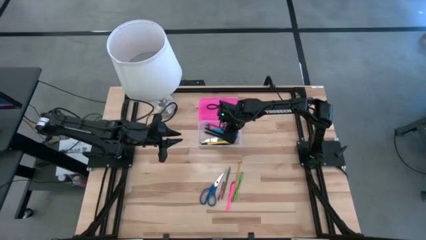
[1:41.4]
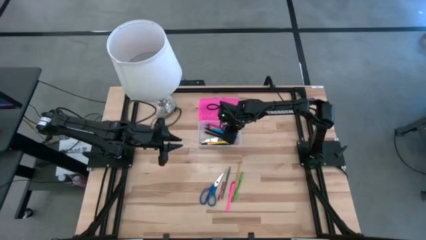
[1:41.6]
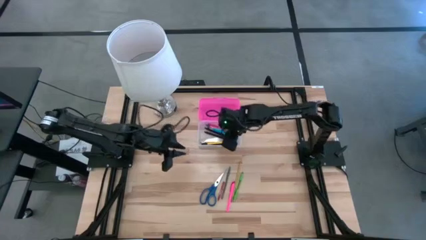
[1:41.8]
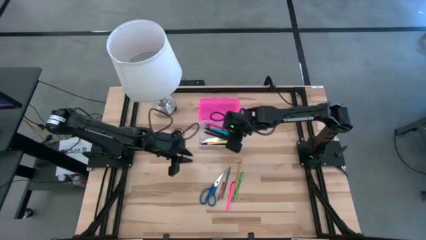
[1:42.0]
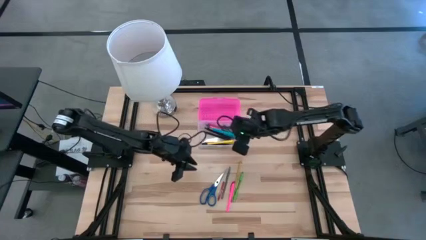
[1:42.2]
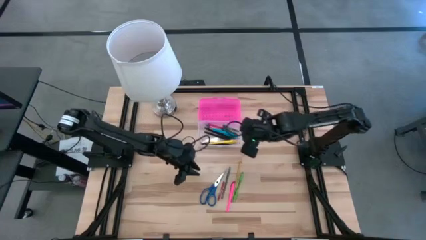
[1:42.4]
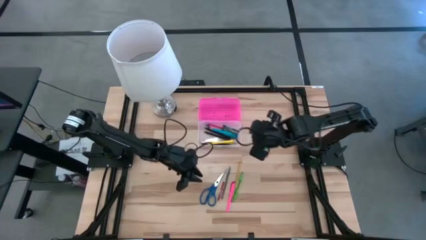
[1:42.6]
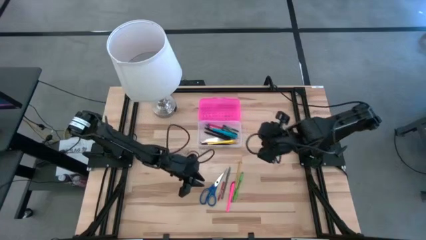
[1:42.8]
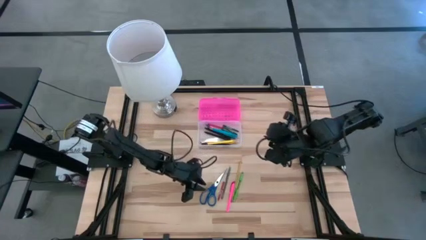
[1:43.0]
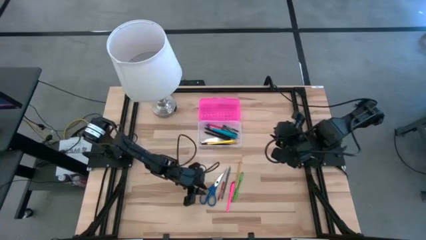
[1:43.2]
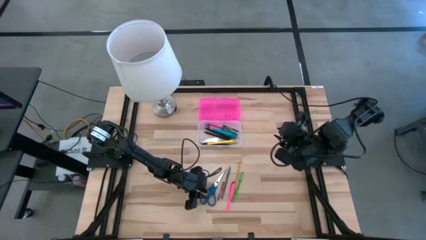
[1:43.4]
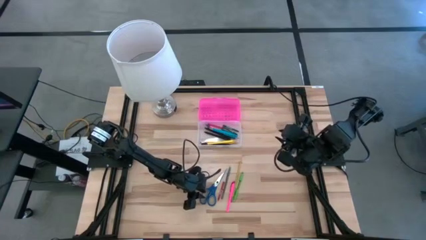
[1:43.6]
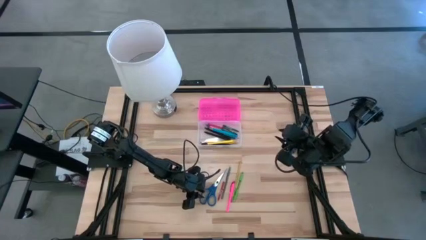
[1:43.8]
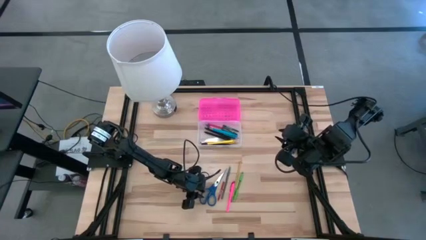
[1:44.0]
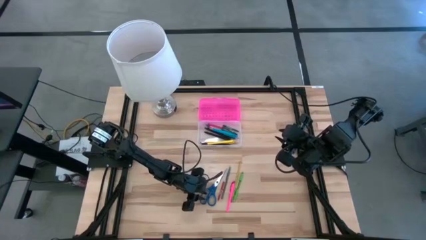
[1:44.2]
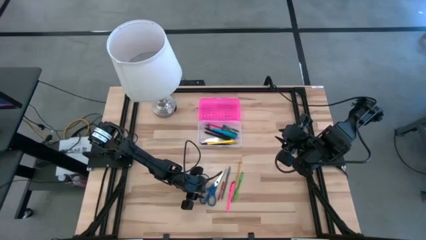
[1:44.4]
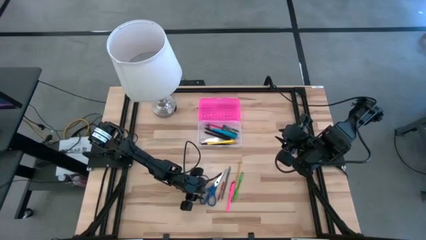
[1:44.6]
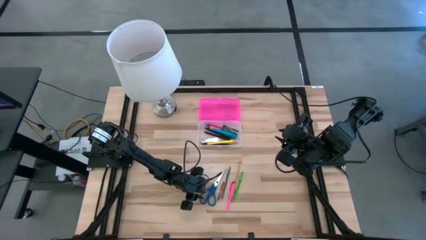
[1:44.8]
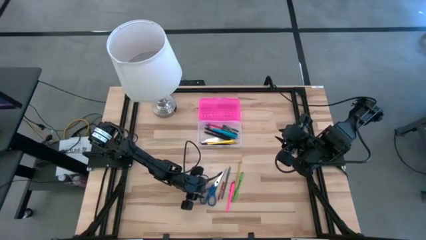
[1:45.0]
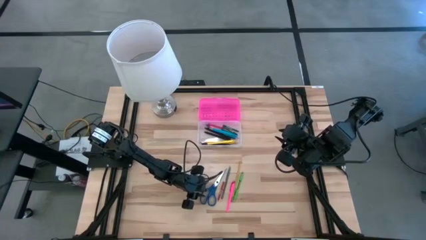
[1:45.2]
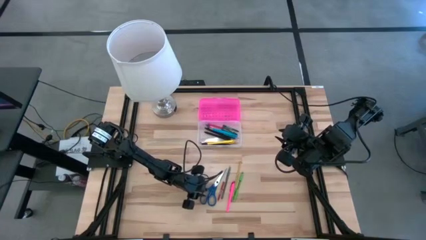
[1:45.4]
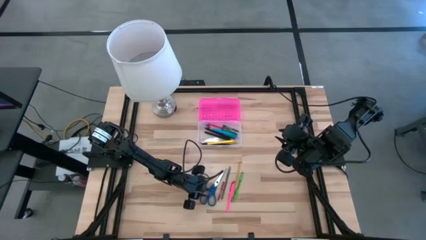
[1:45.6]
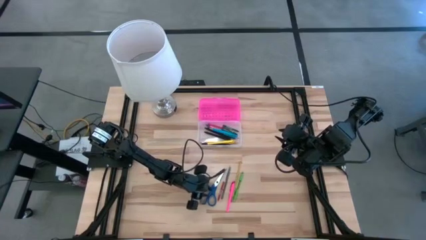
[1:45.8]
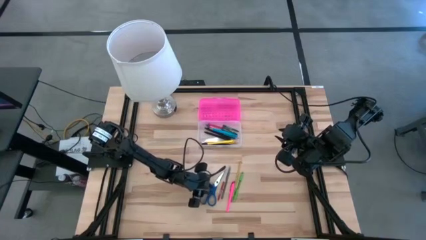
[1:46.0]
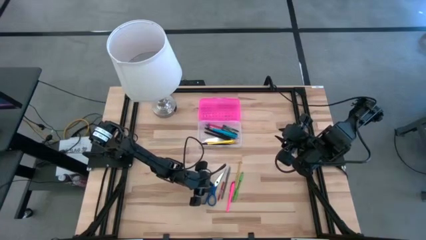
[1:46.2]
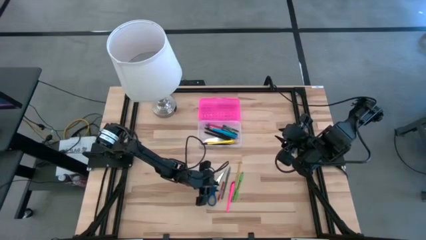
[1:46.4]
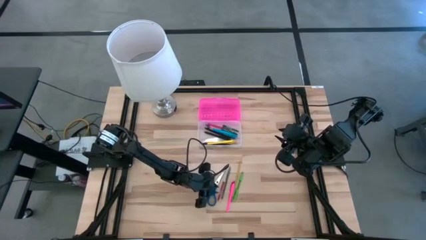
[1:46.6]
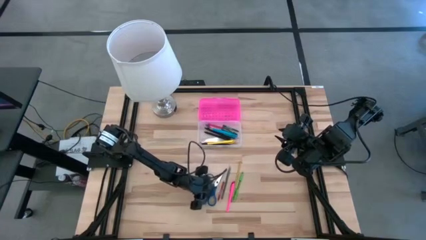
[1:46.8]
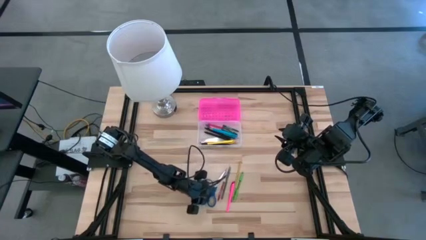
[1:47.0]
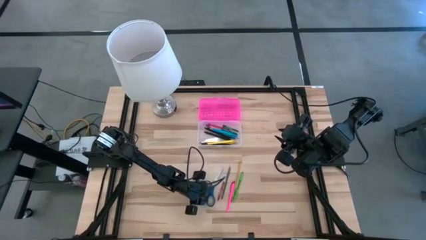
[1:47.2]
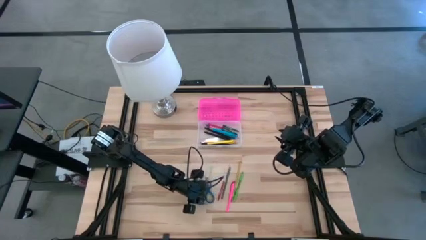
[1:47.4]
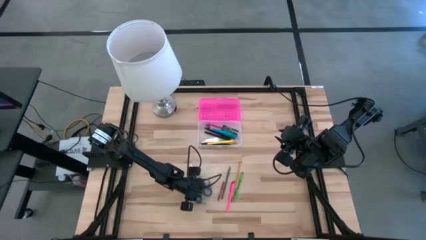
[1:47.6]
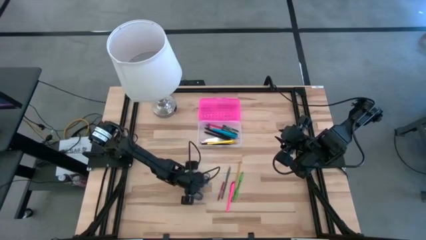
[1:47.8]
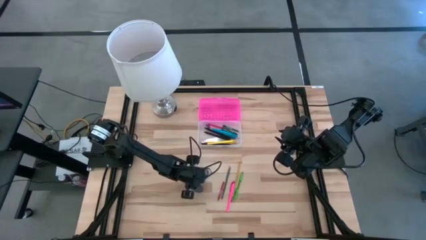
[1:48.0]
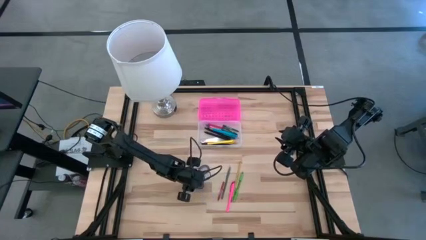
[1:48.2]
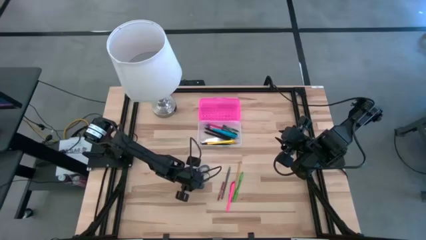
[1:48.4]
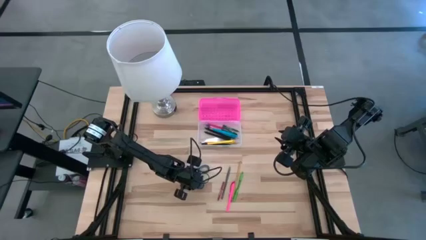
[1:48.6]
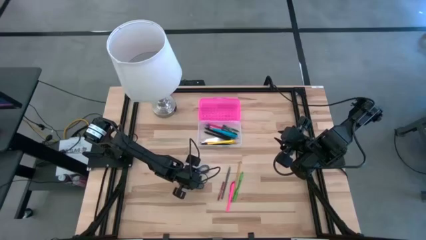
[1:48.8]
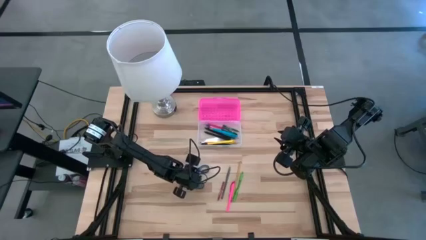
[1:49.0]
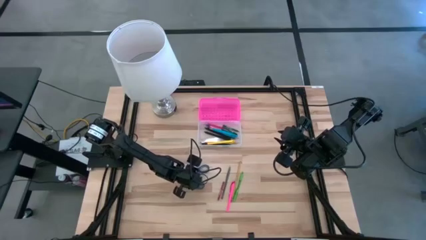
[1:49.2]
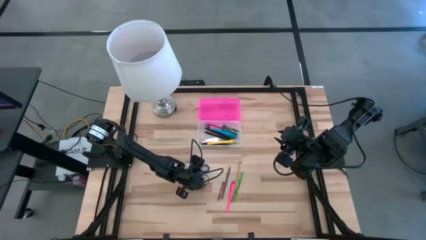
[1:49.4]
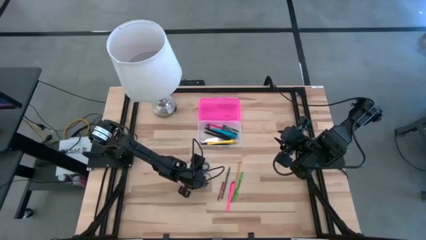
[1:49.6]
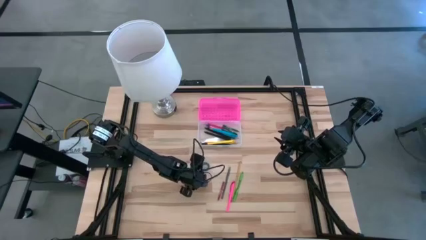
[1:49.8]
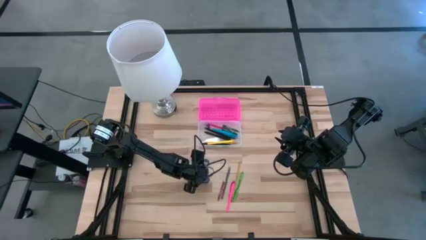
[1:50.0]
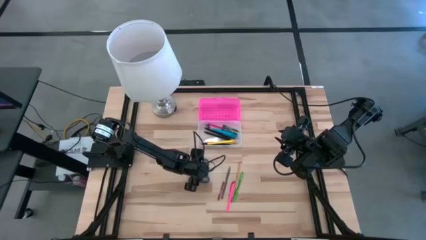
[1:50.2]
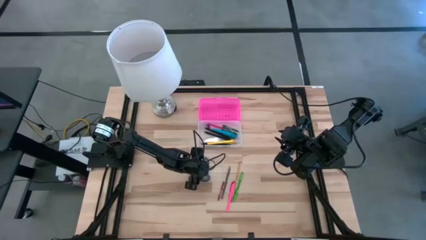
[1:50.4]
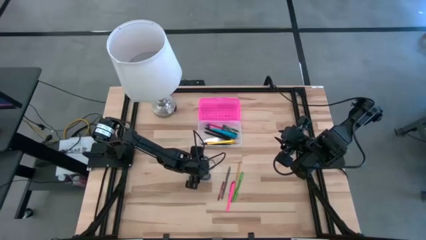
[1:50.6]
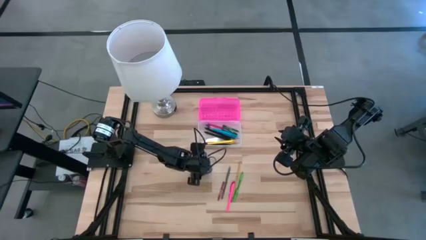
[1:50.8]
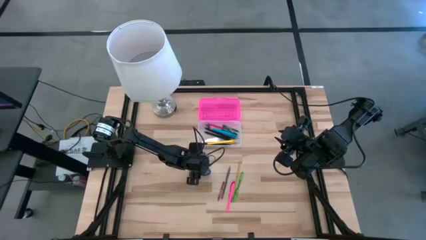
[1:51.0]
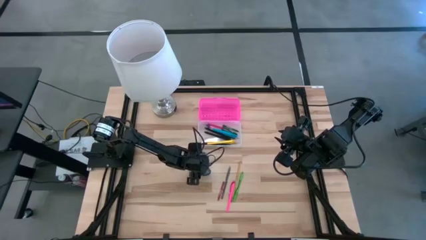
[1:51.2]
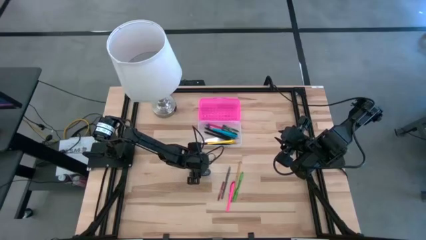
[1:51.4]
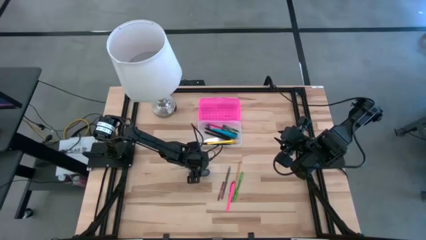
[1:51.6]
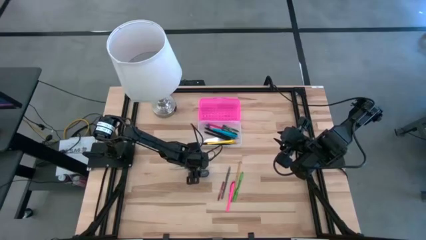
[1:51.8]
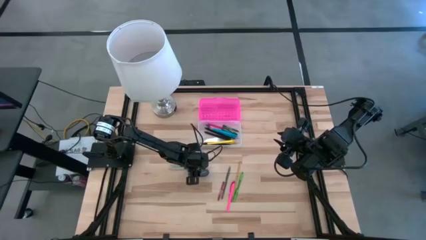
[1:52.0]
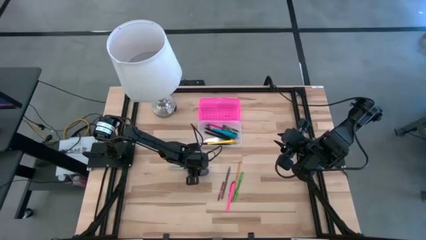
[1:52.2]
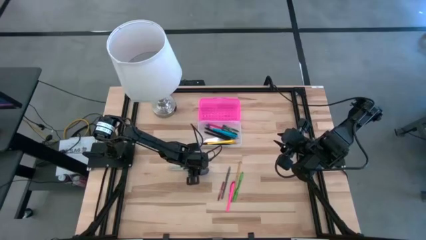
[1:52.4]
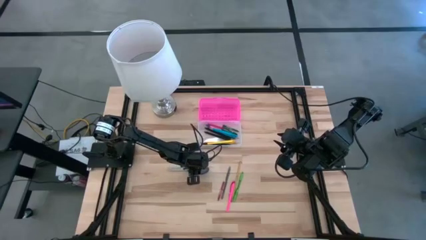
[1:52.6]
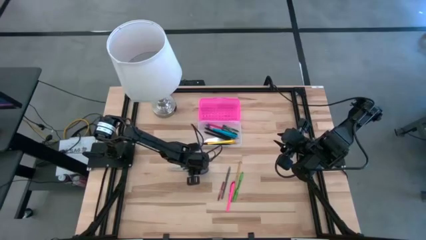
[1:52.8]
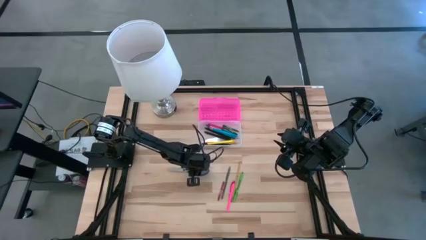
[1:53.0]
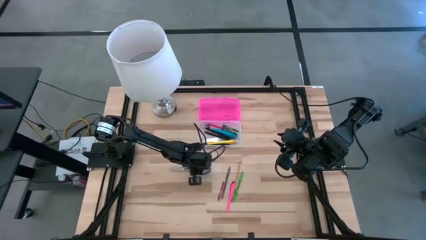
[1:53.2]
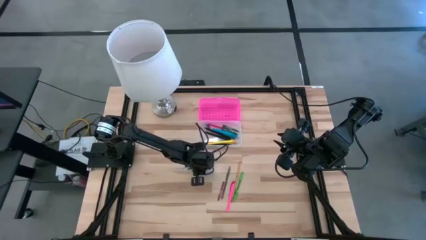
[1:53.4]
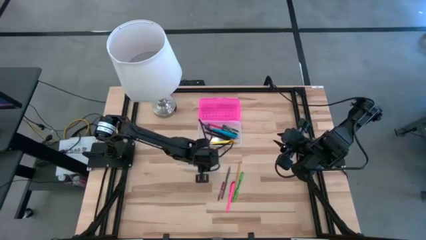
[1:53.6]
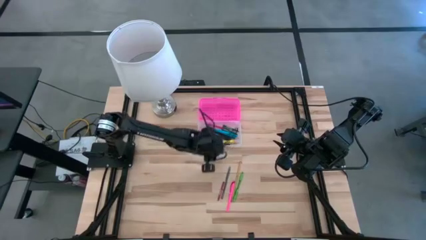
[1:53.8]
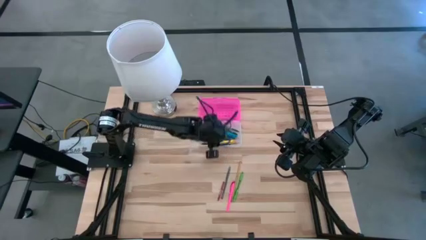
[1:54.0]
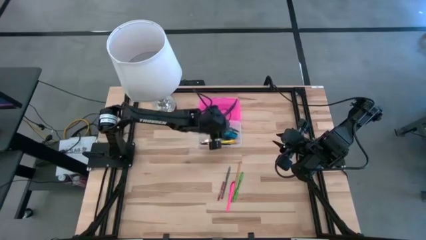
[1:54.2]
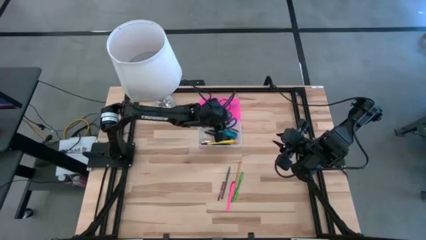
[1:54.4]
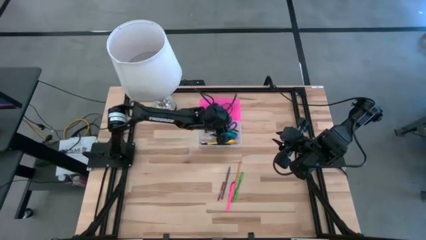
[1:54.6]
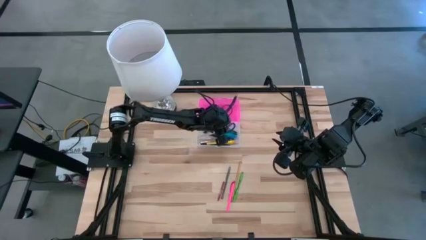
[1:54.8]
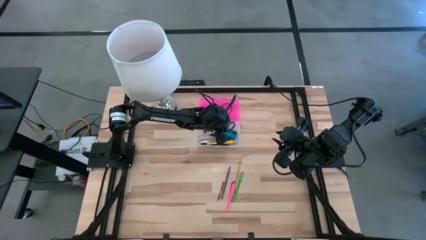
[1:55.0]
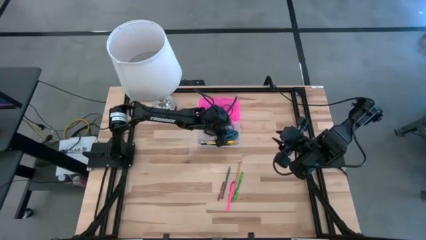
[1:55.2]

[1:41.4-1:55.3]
Task: Pick & place school supplies into a supply box
Put the blue scissors into the pink supply box

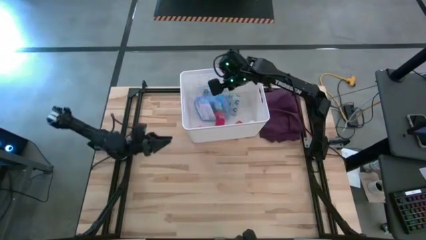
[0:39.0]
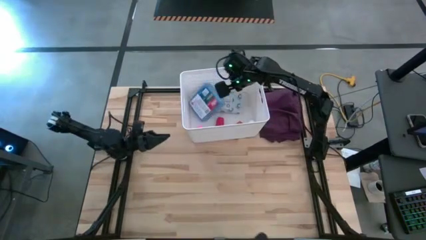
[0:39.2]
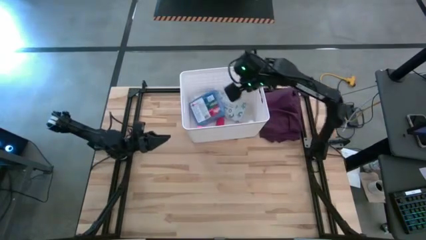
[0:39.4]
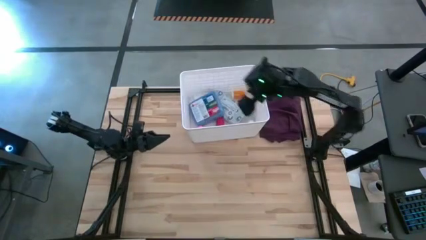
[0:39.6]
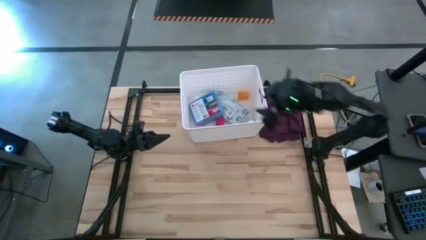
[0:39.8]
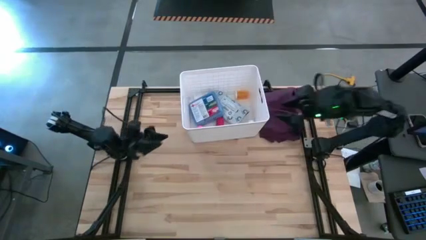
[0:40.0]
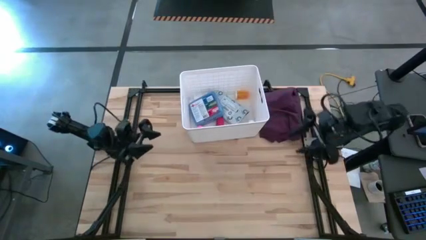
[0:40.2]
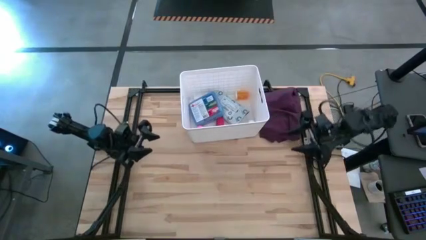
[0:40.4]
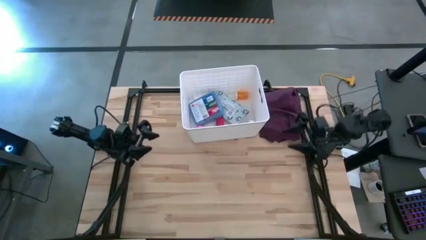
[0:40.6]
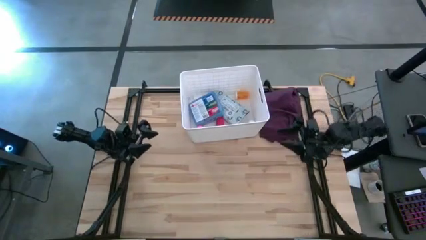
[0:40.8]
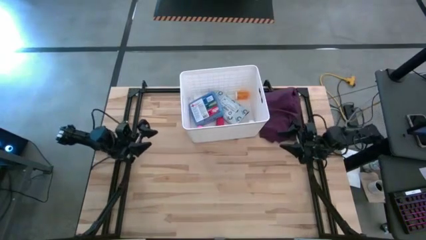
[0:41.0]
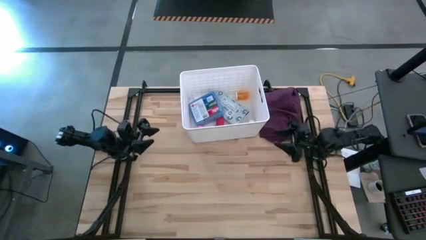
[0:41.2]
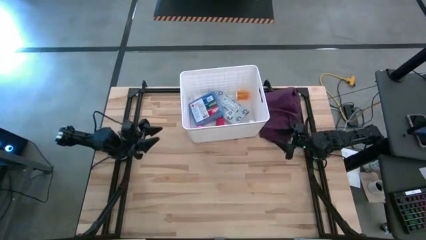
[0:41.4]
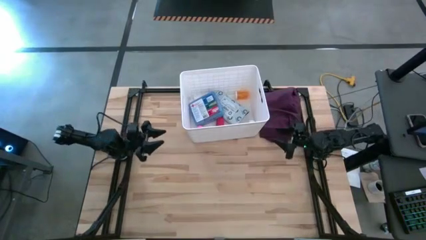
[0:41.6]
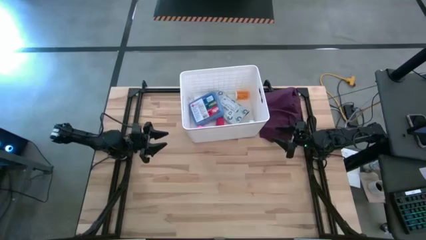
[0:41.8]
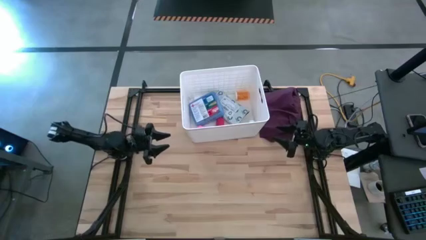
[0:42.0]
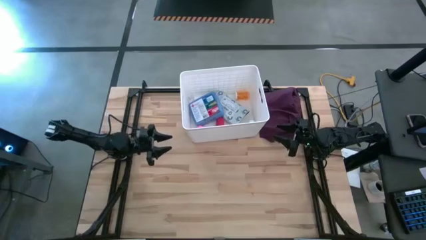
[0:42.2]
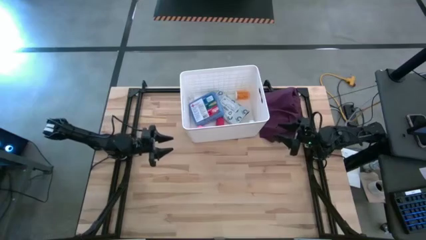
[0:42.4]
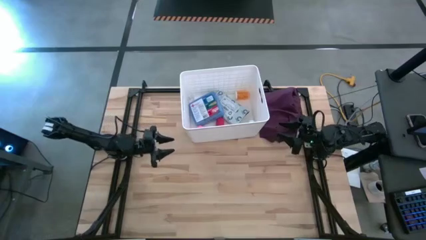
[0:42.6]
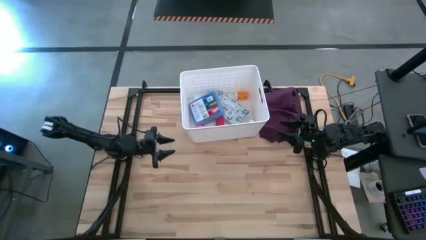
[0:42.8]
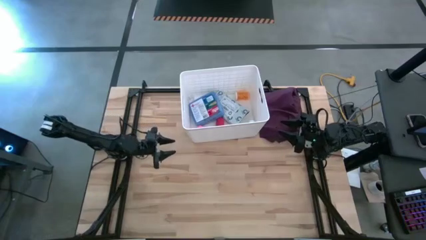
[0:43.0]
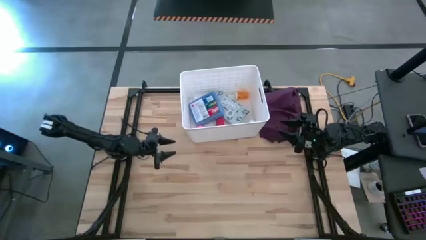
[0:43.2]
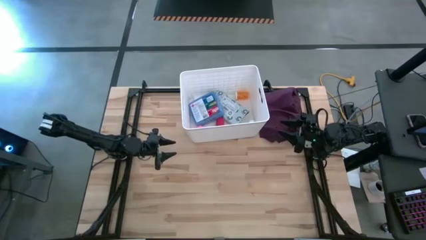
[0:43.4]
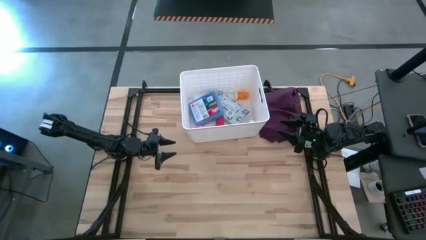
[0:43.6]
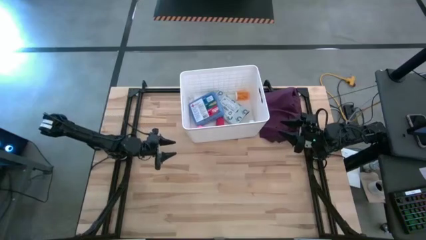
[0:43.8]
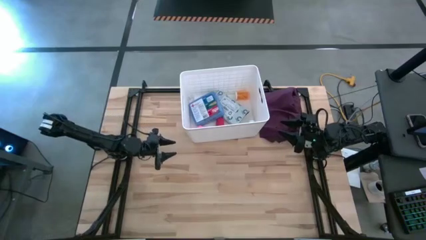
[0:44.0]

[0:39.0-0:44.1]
Task: Pick & place medical supplies in basket/bin
Return to Home Position
